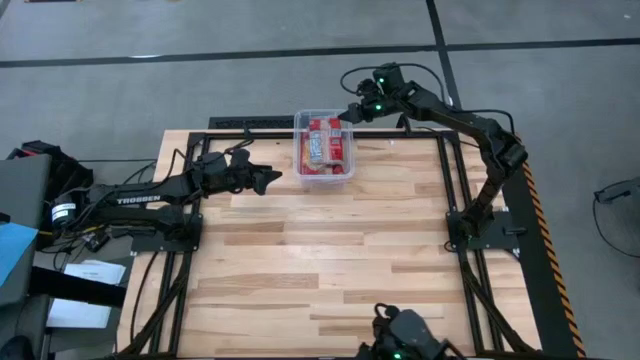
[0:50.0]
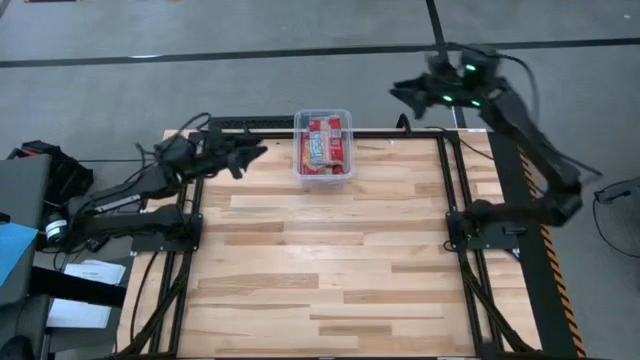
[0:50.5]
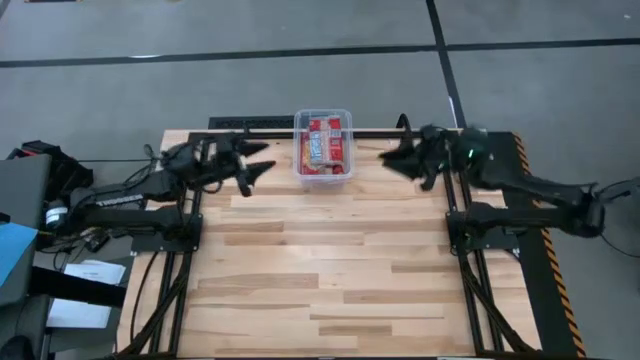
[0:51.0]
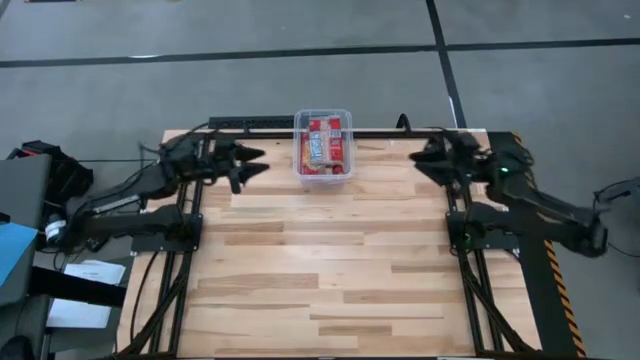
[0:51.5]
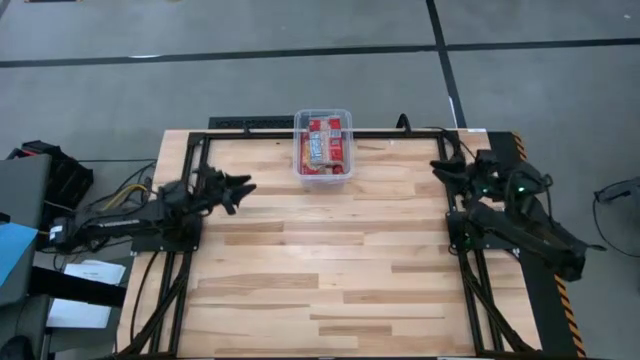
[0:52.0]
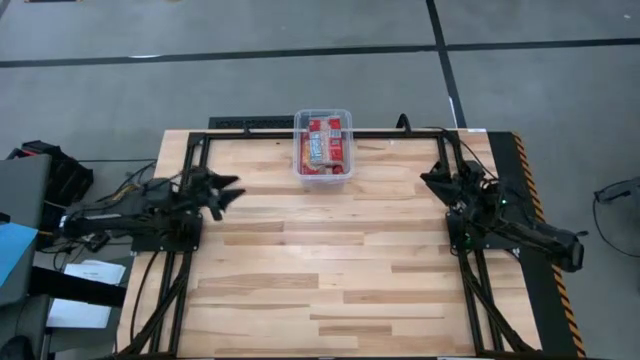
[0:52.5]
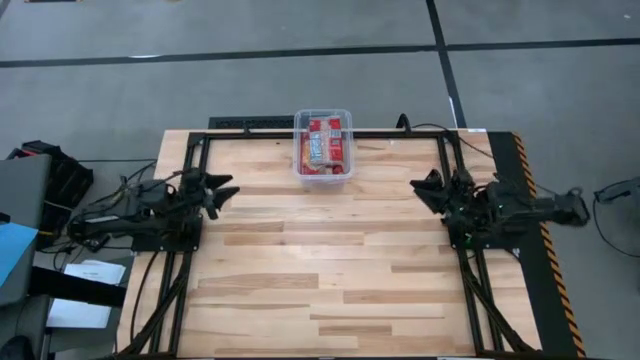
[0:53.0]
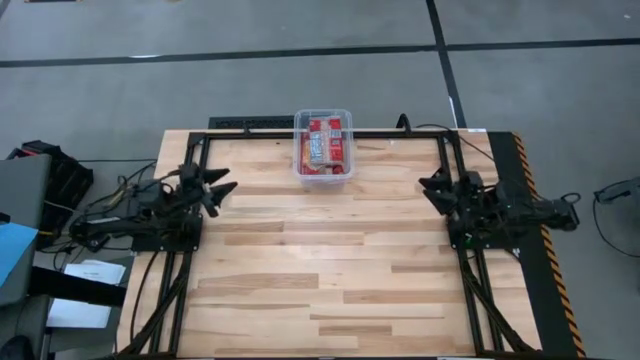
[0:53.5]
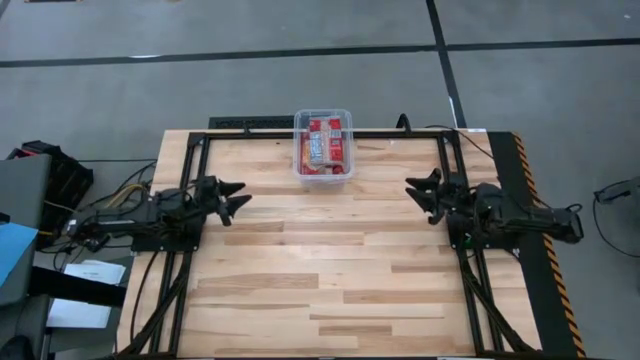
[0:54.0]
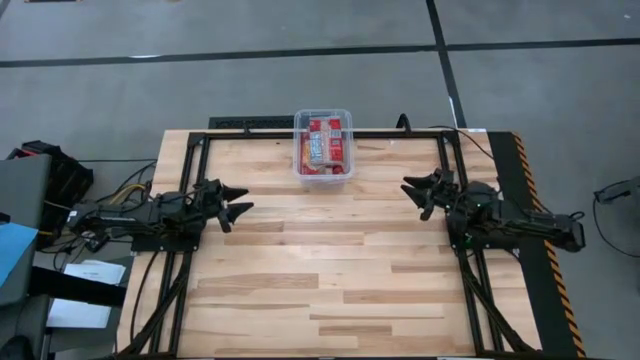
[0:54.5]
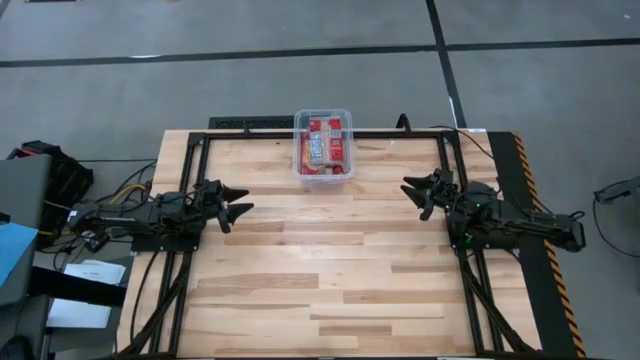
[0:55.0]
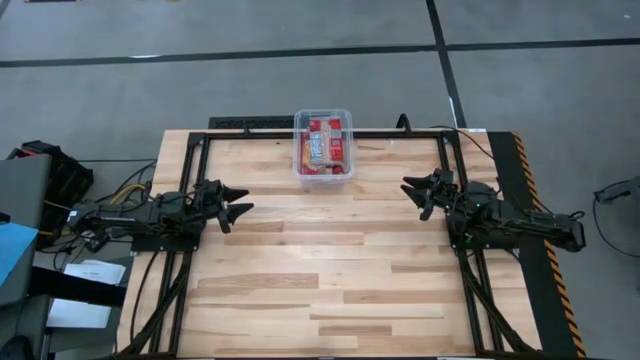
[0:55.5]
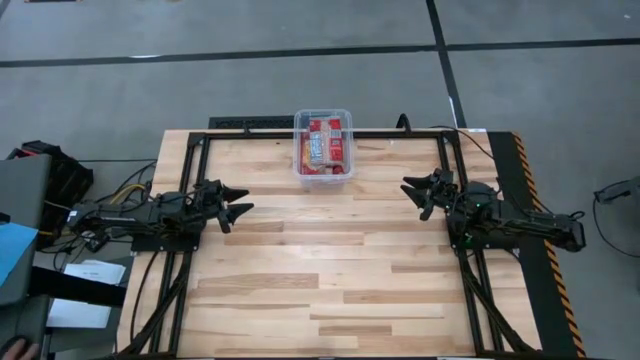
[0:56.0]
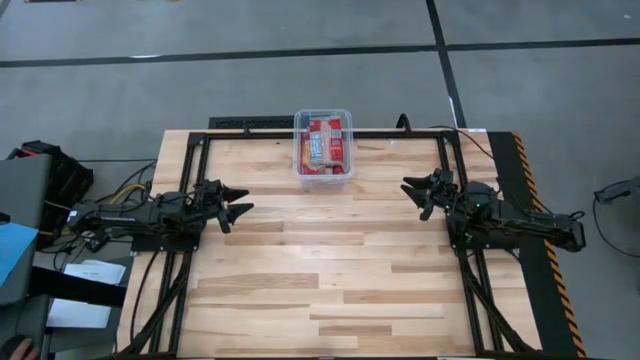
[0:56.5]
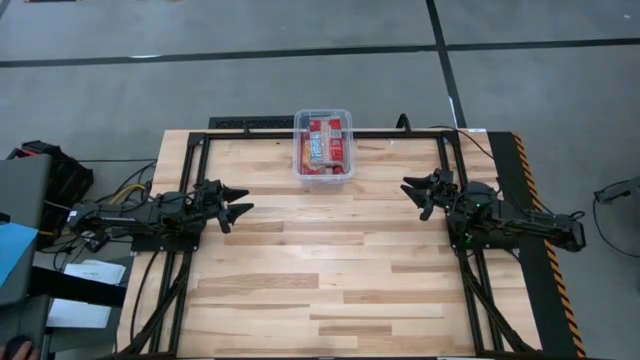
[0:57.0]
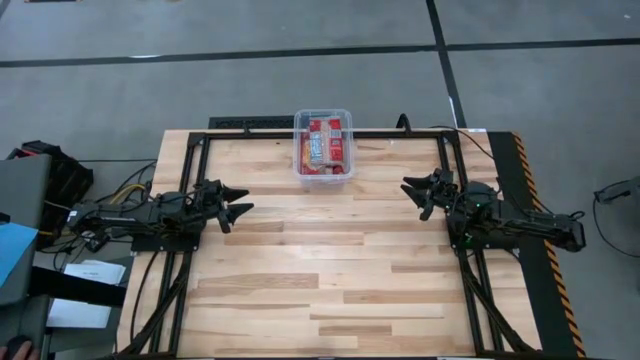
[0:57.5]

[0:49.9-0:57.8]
Task: Sort popcorn bags into baskets
Return to Home Position

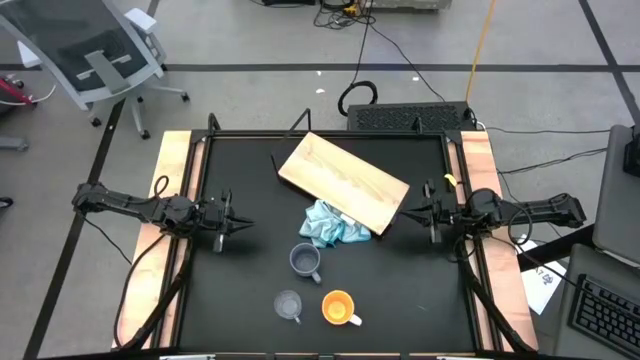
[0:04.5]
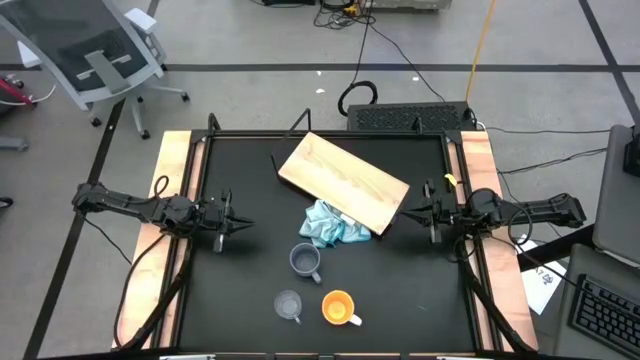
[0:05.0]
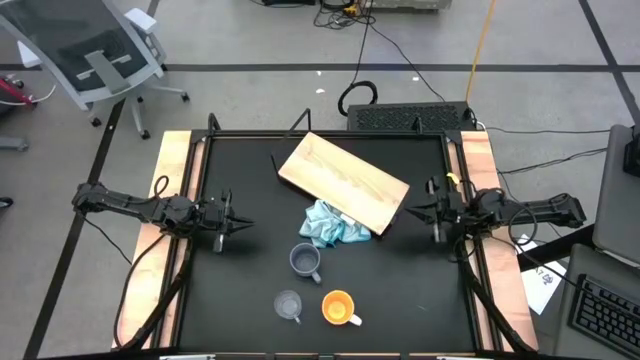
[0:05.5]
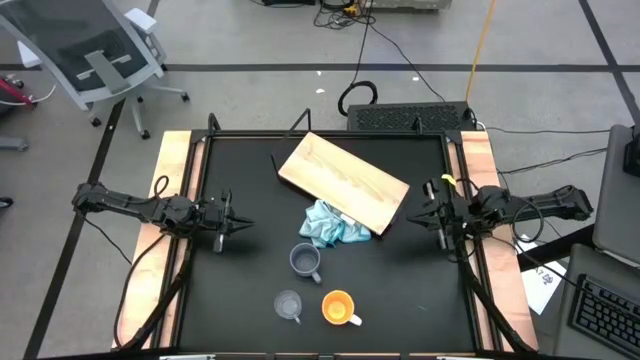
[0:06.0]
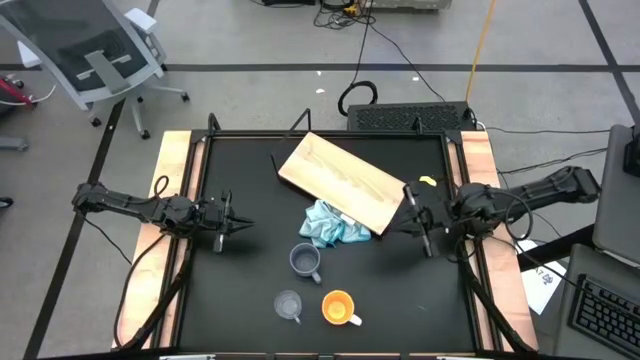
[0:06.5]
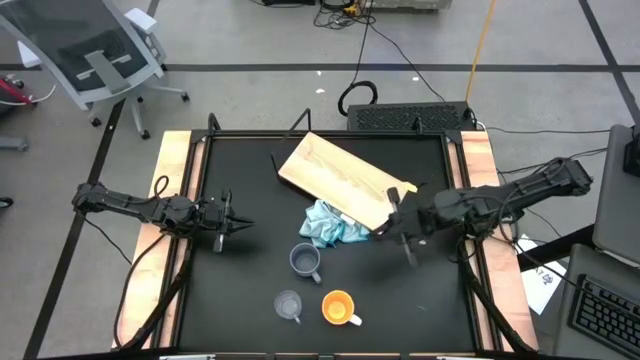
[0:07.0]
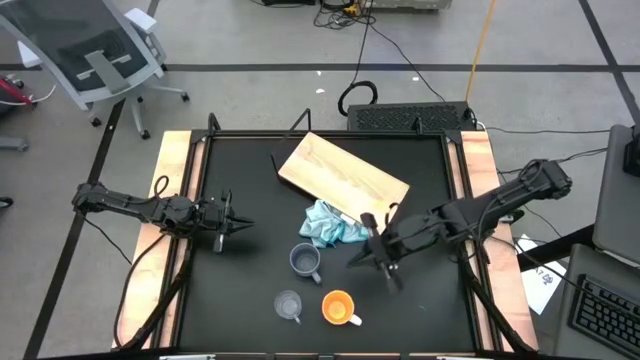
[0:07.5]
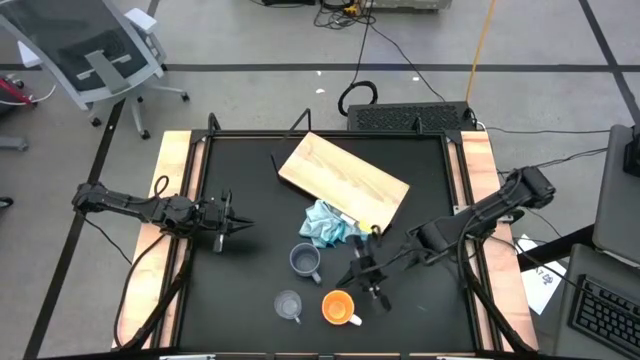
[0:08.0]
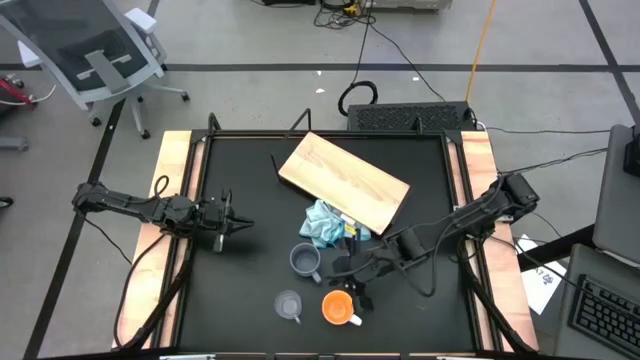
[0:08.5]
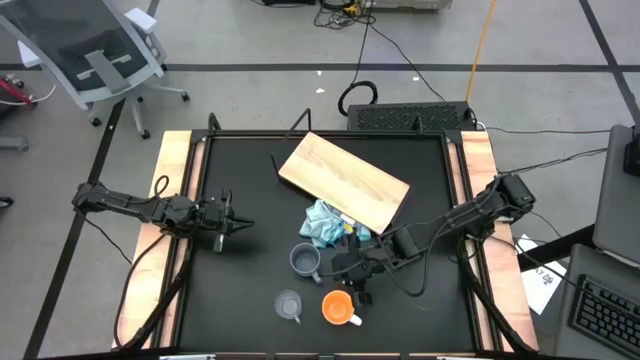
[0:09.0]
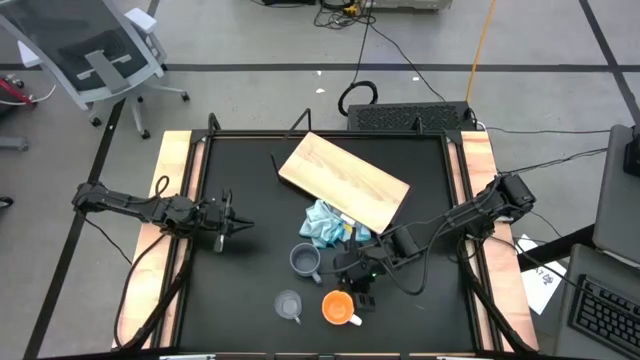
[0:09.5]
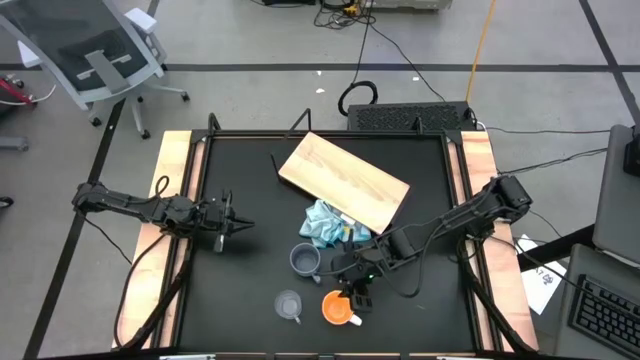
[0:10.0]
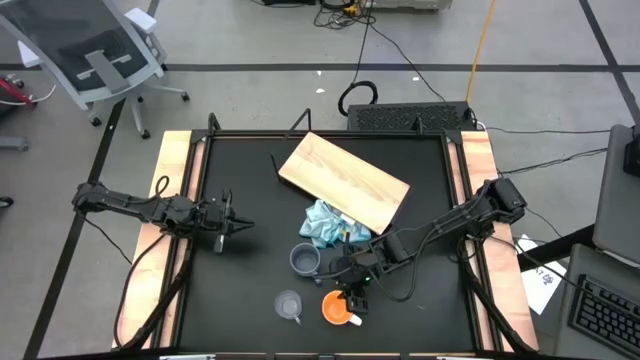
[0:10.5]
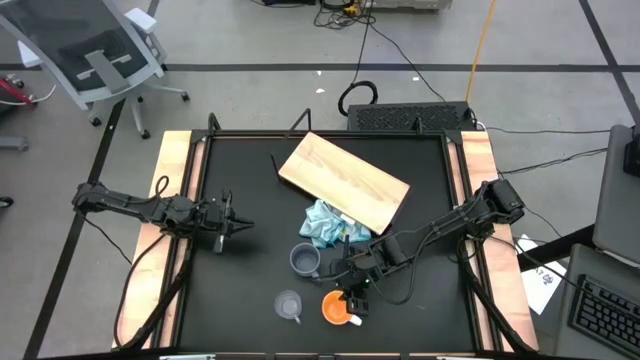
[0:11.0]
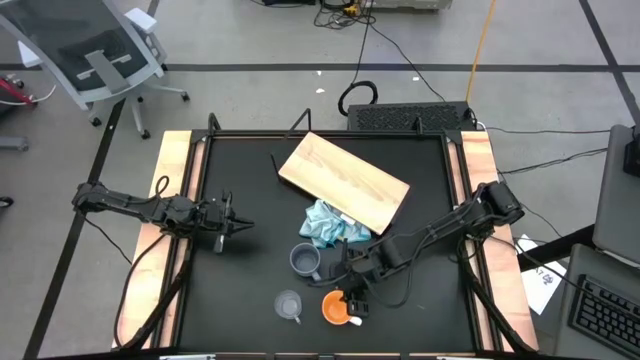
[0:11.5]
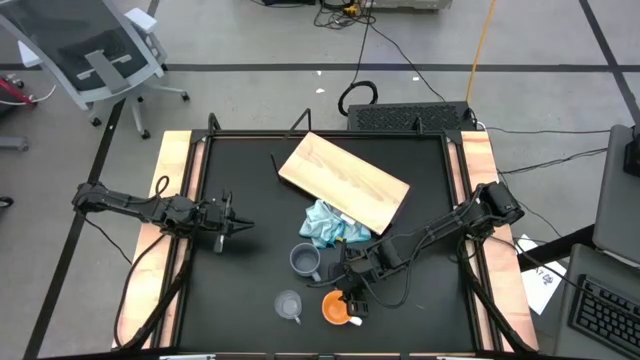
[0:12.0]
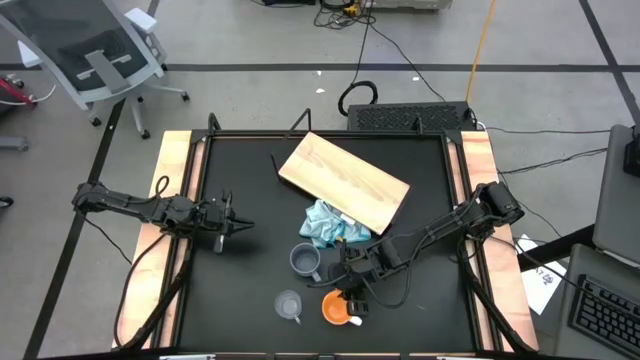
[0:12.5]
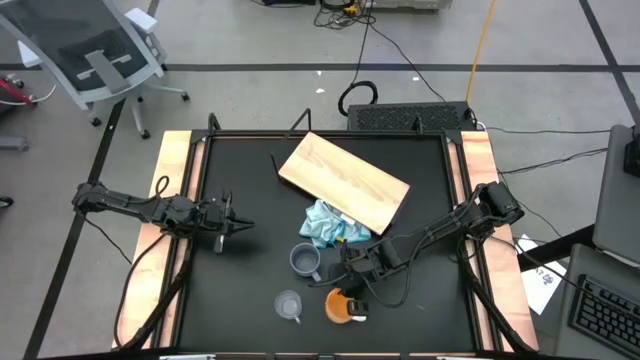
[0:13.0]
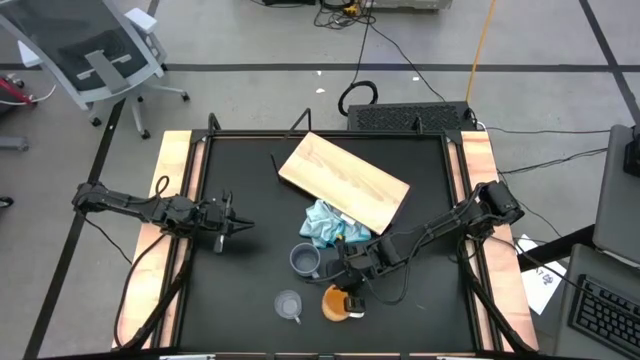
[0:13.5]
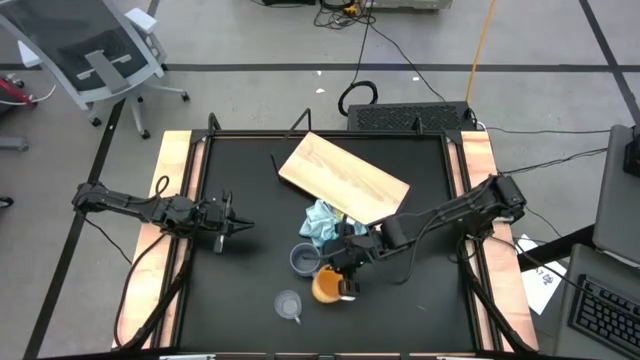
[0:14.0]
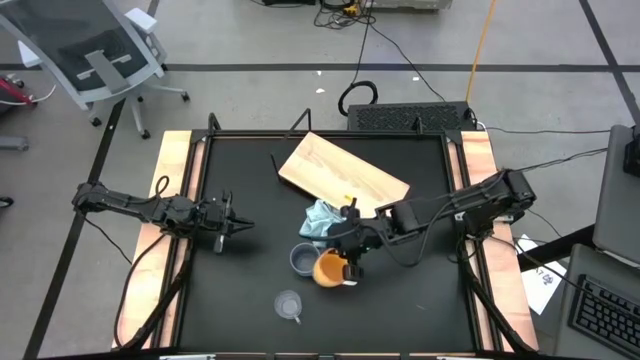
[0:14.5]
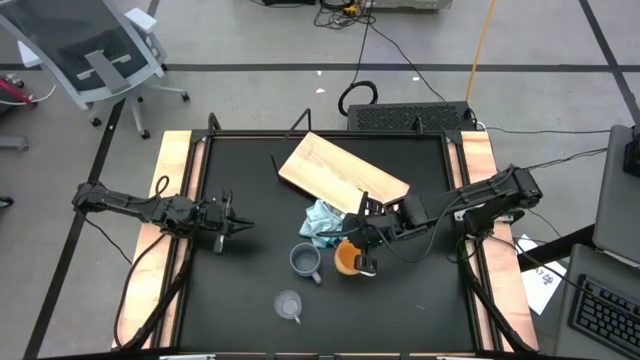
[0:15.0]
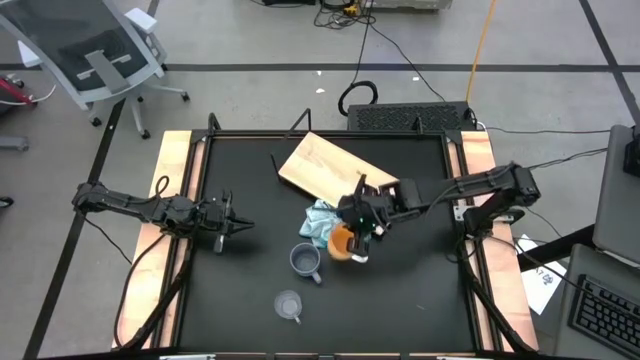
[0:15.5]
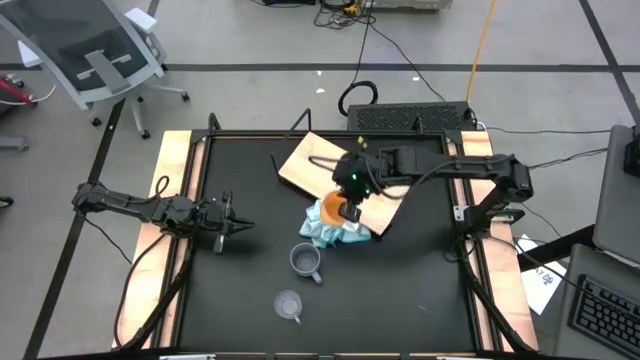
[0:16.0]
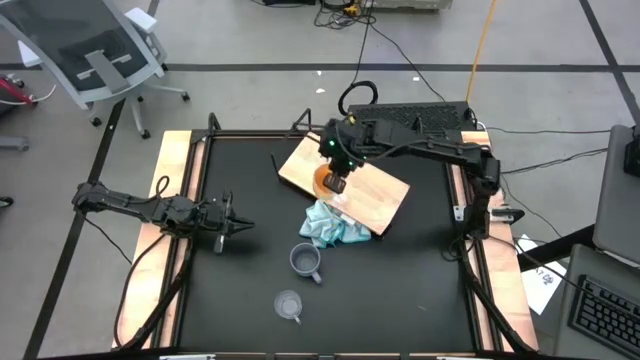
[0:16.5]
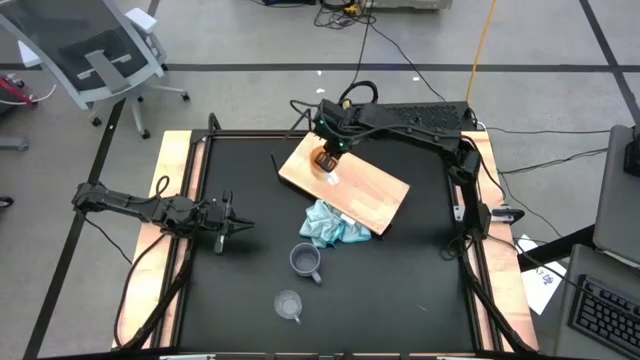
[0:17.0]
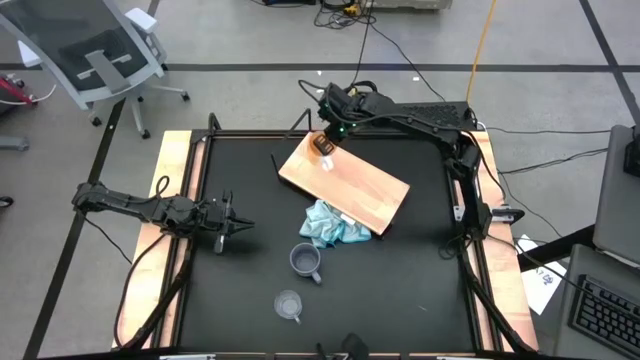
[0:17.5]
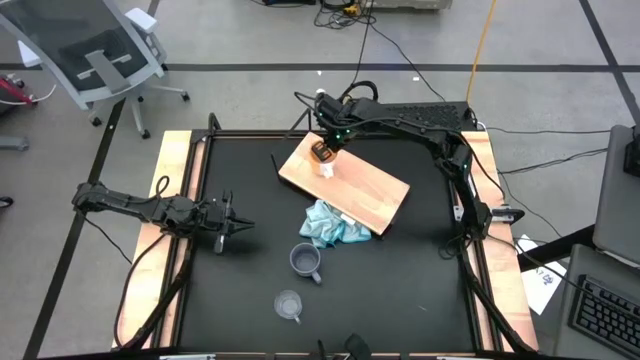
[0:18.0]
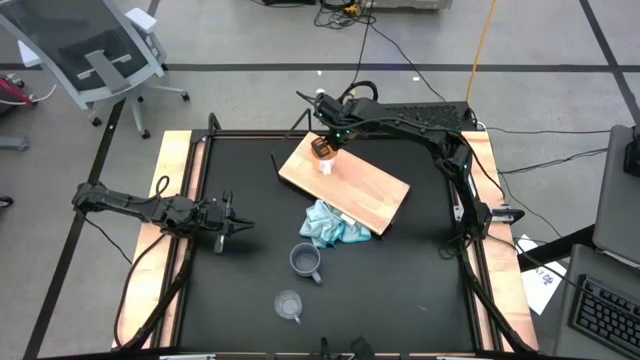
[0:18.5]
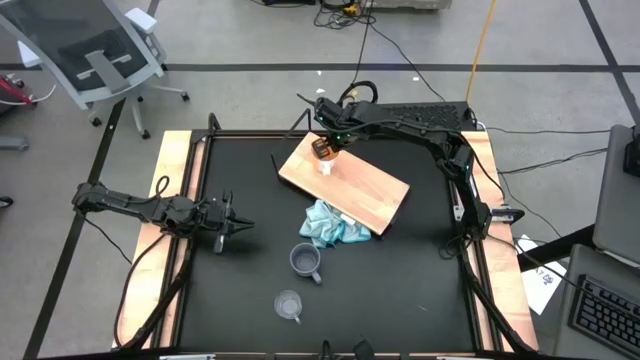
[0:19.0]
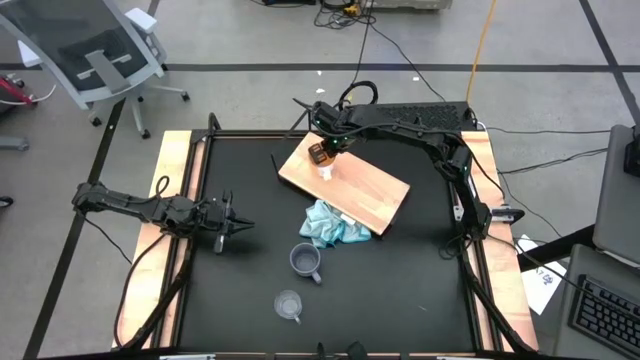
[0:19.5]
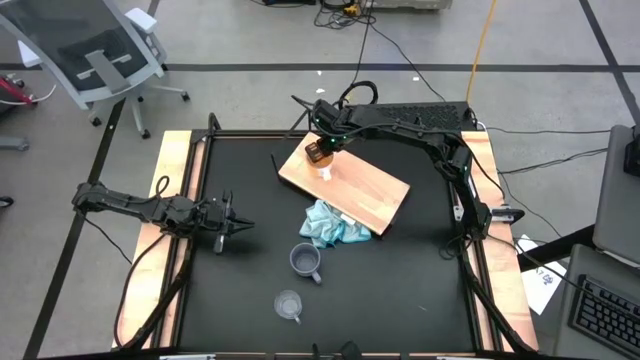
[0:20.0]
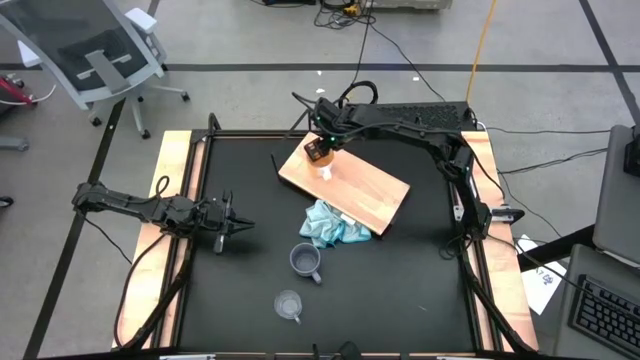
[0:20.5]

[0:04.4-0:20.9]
Task: Stack small to large cups/mugs on shelf
Put the orange mug on the shelf
